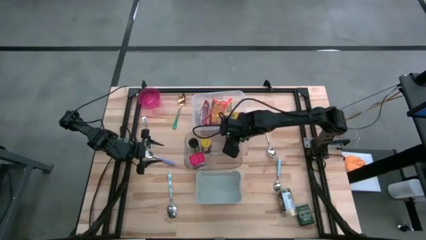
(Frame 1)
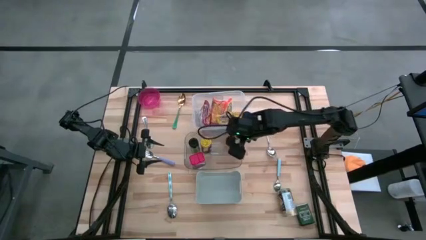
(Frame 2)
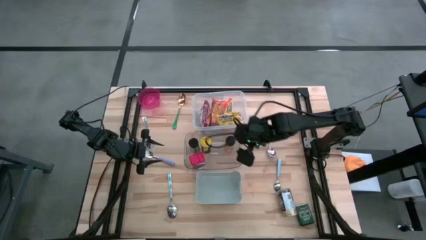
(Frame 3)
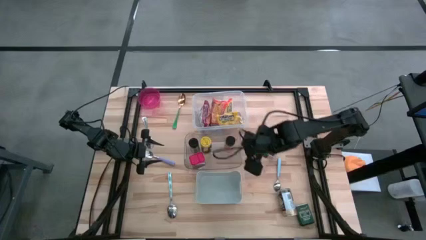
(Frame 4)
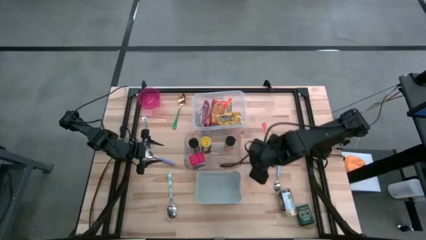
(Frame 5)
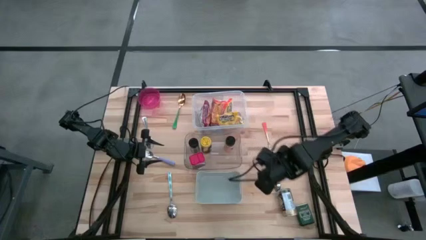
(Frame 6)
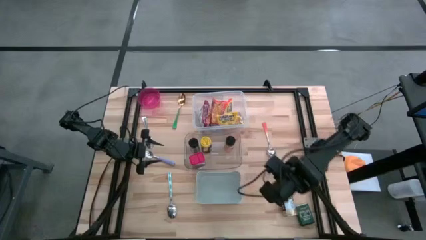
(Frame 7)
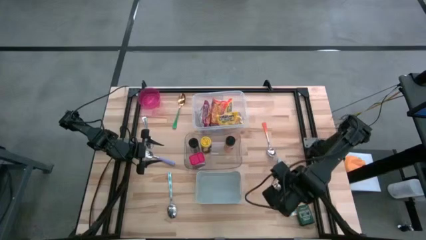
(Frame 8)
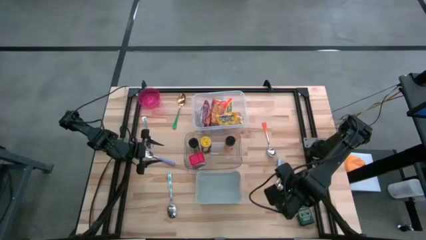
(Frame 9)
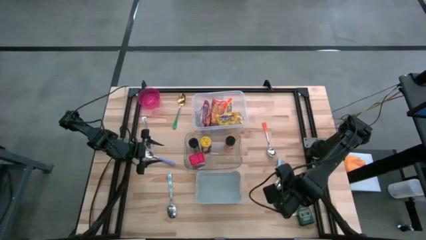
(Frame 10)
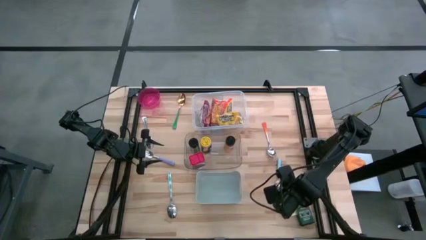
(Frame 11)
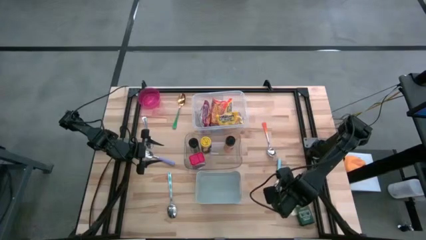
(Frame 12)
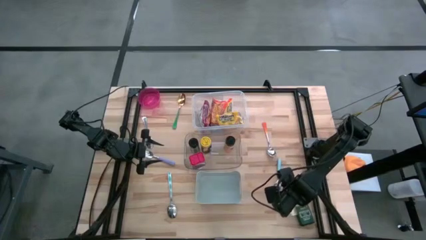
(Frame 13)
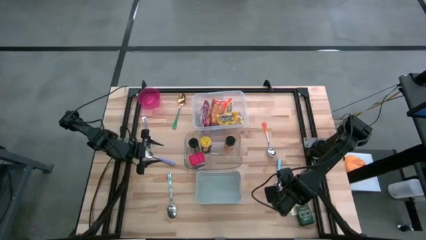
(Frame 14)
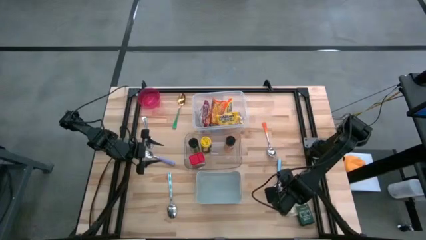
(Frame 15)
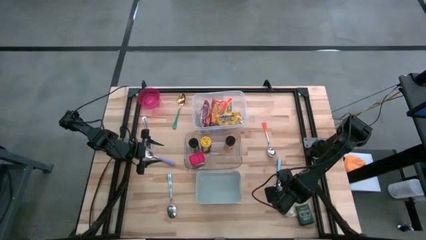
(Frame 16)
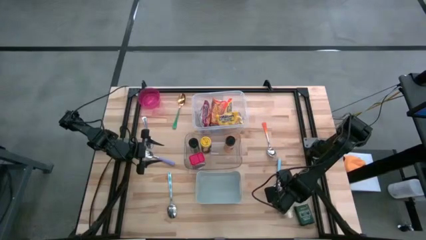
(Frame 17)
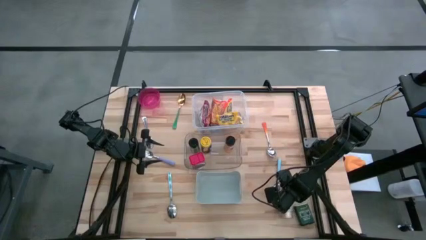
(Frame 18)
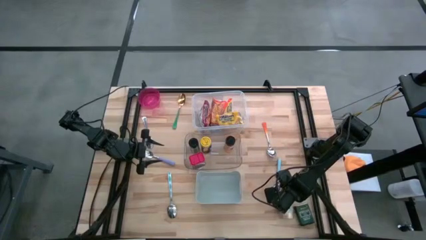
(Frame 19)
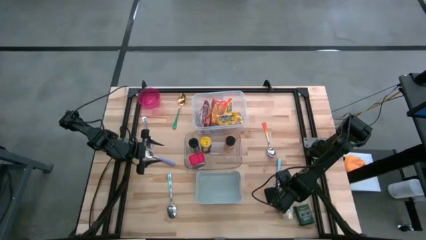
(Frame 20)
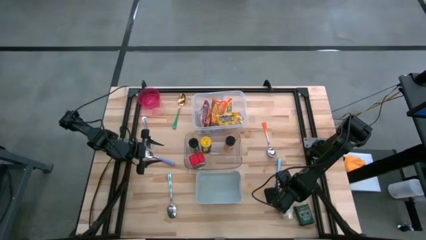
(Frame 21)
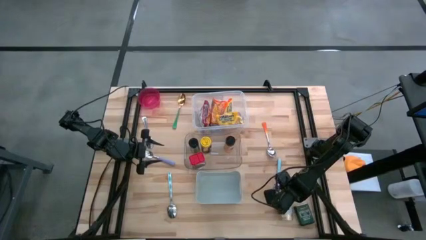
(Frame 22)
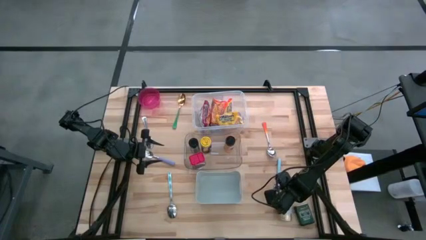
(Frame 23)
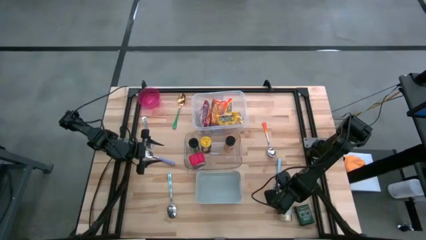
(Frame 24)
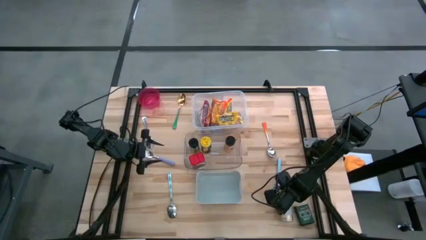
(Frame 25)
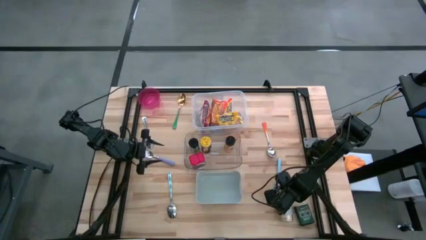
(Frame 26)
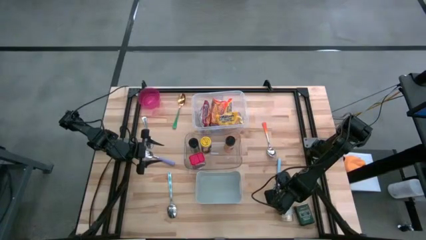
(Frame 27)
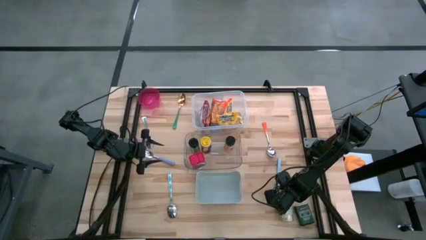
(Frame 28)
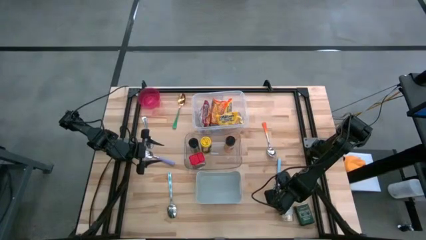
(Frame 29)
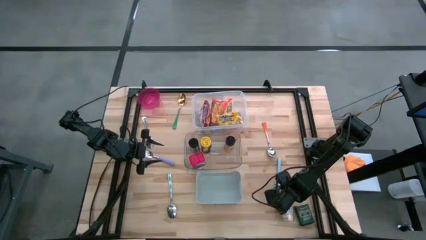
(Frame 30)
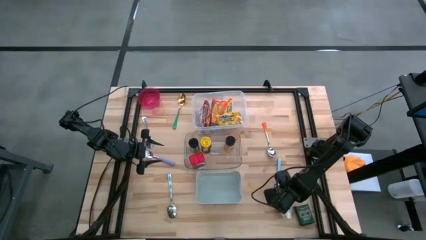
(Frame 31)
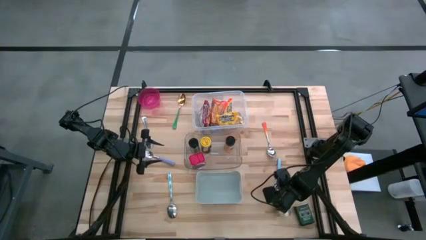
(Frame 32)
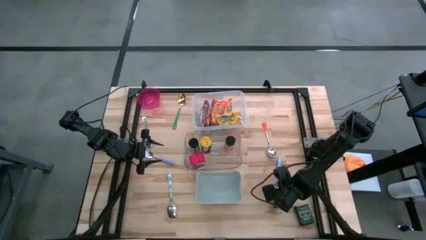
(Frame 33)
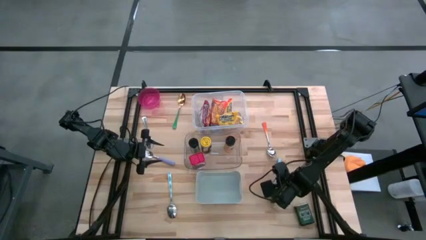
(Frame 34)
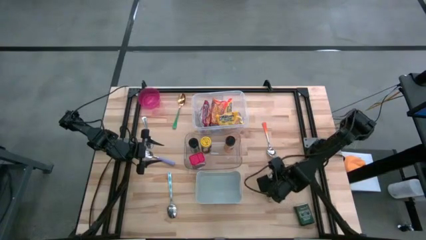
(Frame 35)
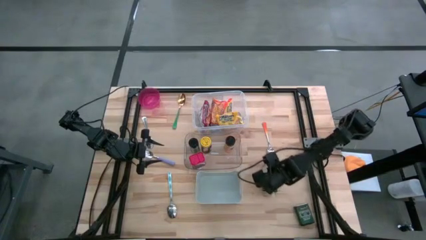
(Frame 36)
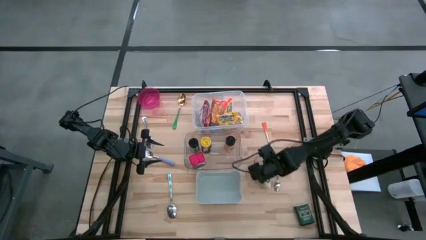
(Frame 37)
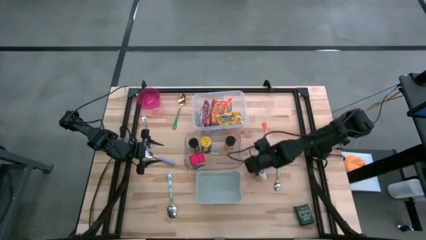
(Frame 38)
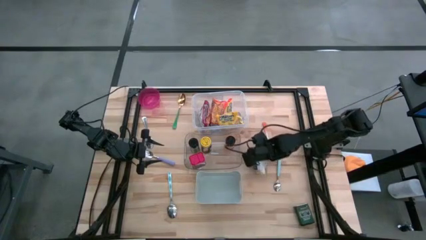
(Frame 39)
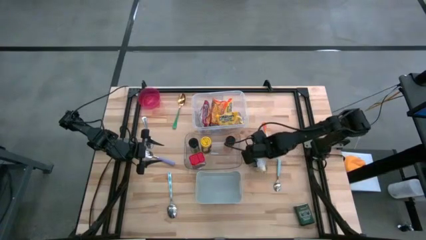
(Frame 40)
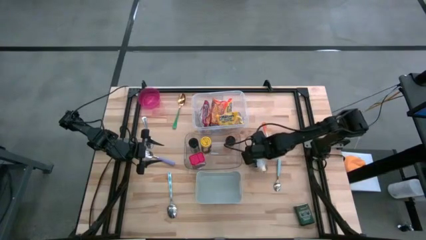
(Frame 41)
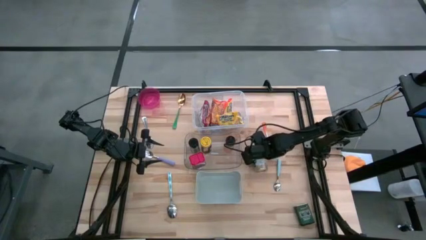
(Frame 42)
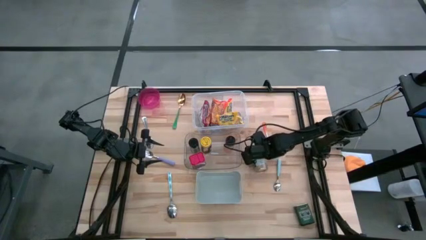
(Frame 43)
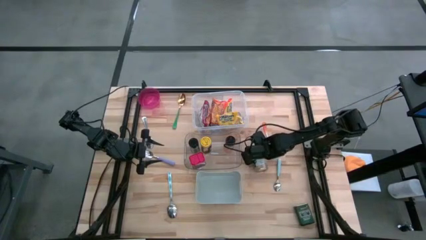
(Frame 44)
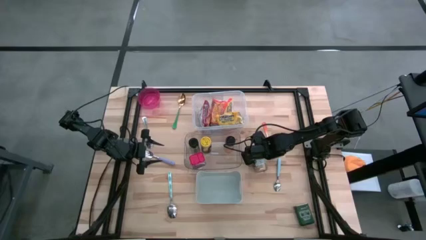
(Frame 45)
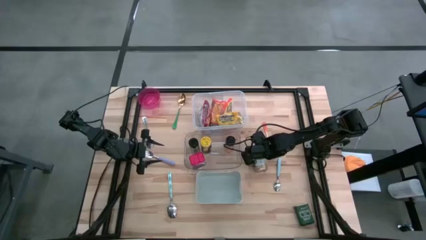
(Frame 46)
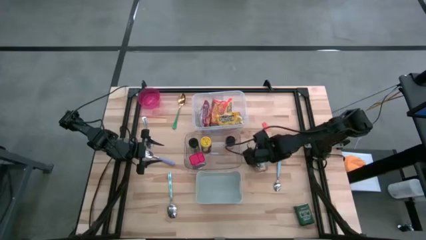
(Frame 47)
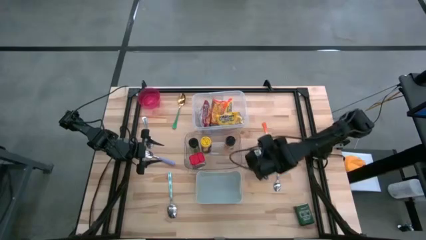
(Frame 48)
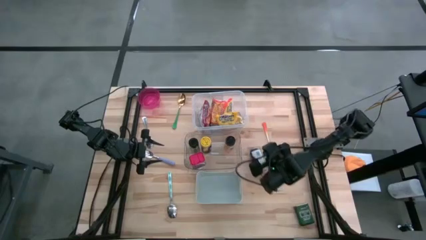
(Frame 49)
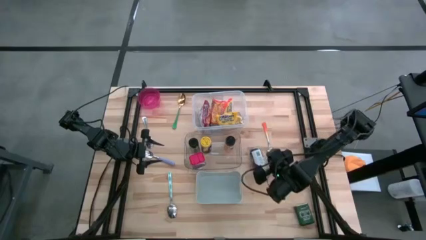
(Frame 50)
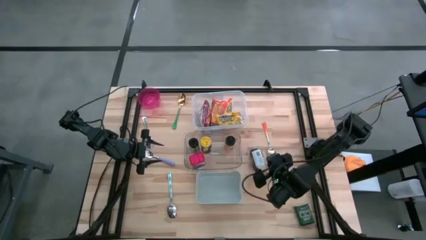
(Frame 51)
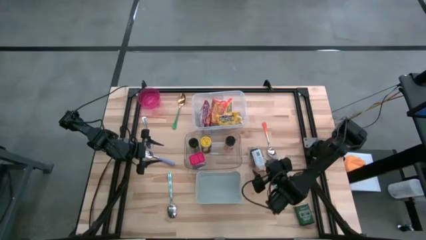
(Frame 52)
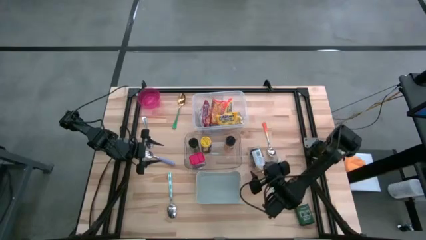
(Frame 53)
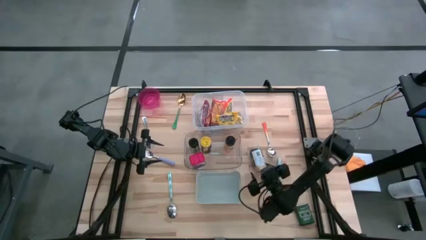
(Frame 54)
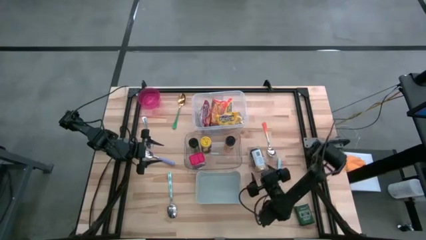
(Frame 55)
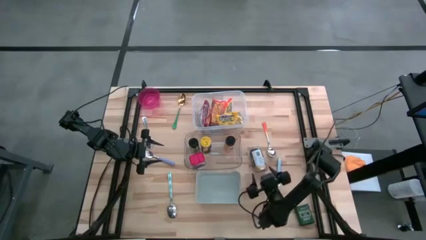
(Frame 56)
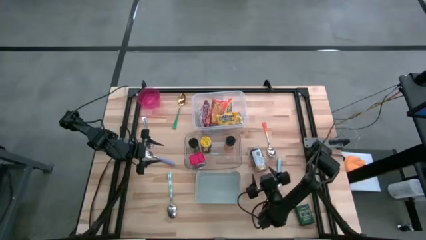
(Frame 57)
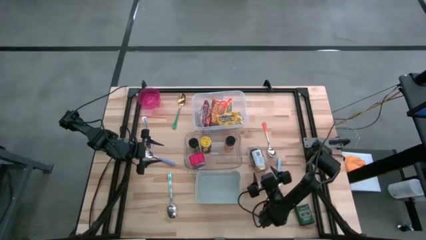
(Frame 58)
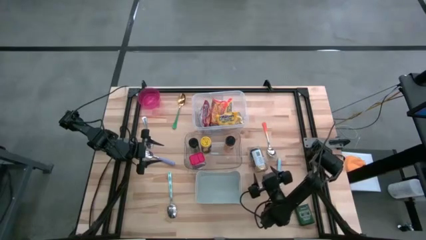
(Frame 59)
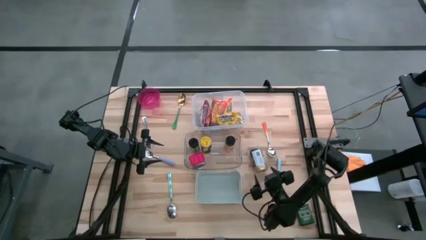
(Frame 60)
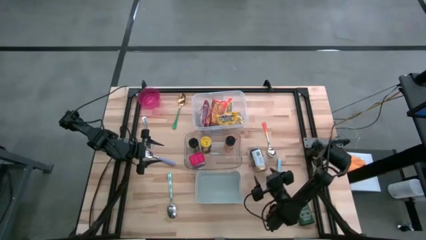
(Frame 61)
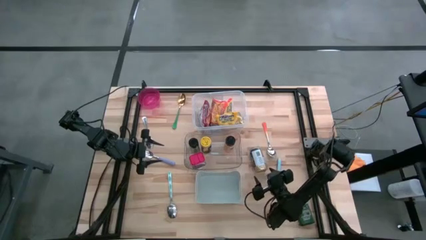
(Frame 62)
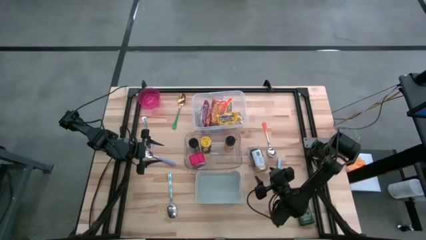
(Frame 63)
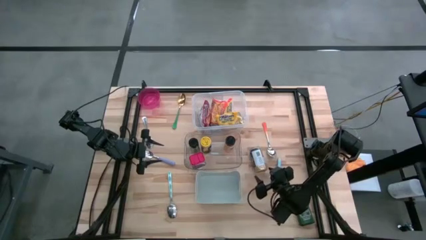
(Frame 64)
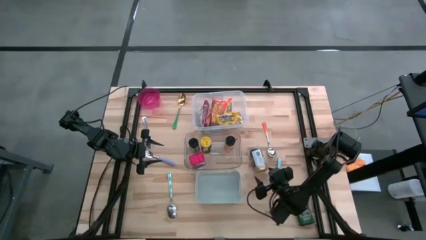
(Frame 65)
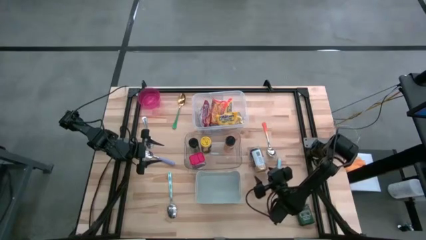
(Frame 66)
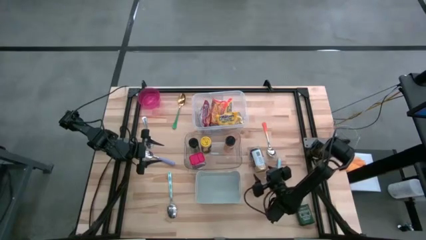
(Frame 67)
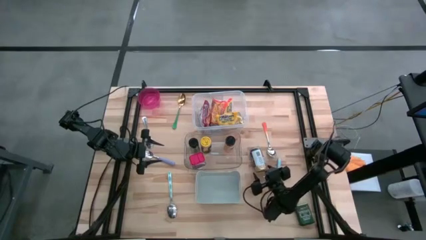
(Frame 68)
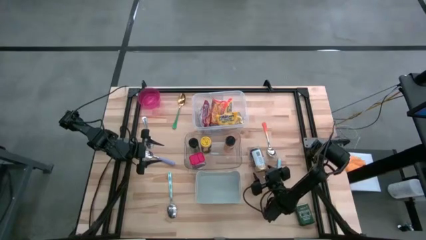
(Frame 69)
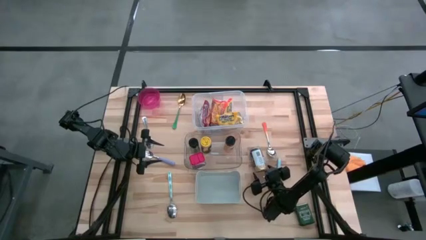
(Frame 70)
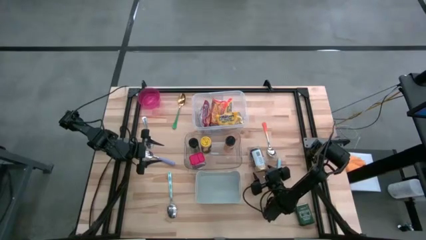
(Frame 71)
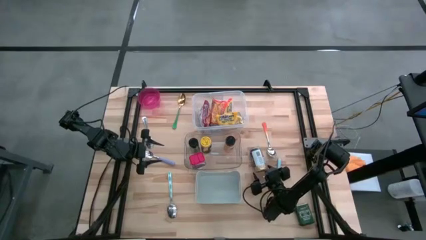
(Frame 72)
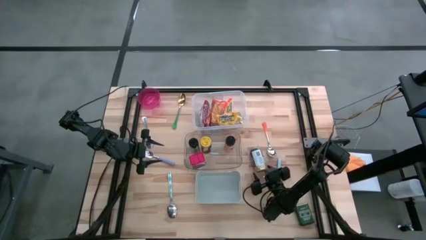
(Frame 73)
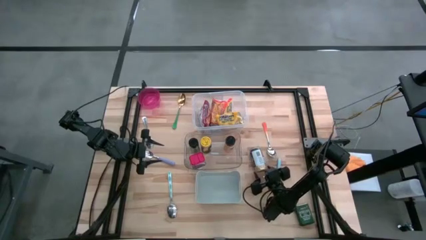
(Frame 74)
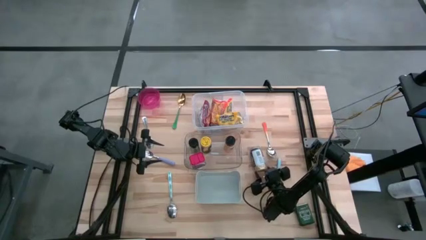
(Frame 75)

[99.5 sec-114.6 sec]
Put the gold spice bottle into the transparent bin
